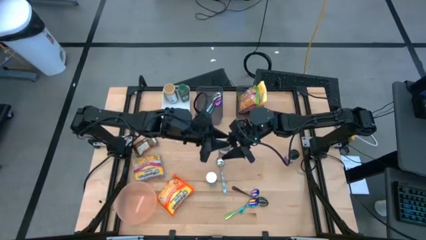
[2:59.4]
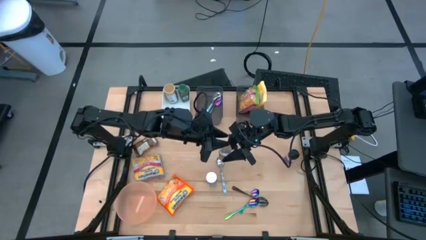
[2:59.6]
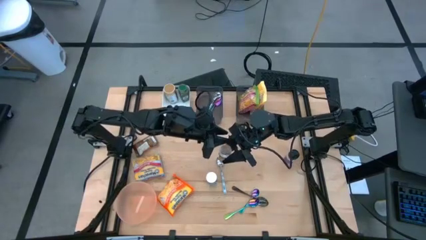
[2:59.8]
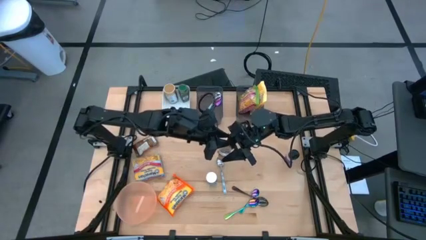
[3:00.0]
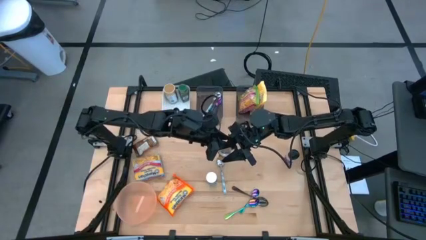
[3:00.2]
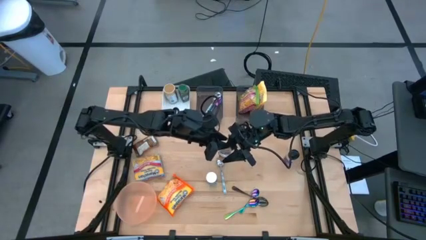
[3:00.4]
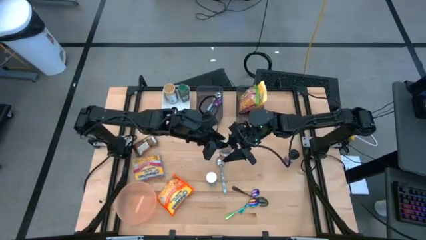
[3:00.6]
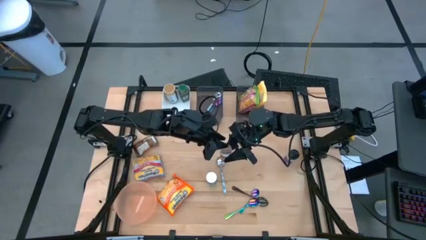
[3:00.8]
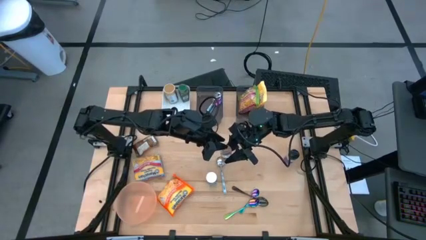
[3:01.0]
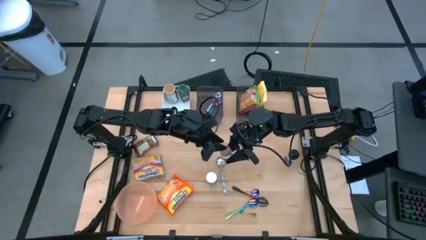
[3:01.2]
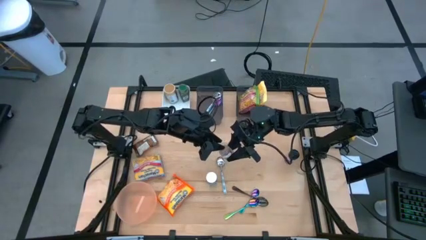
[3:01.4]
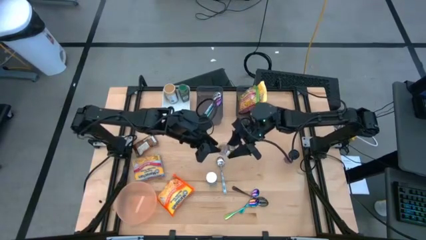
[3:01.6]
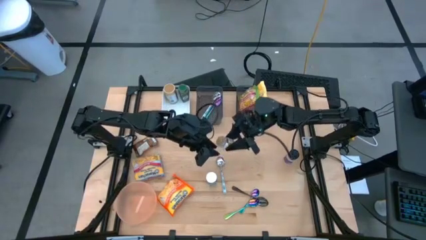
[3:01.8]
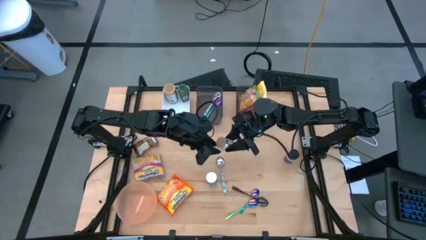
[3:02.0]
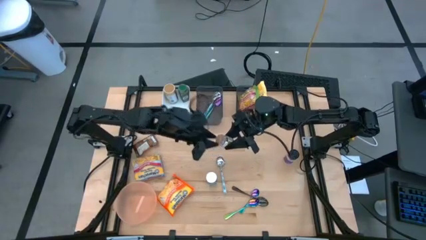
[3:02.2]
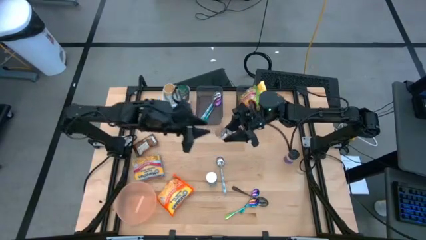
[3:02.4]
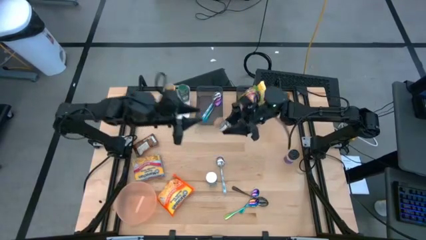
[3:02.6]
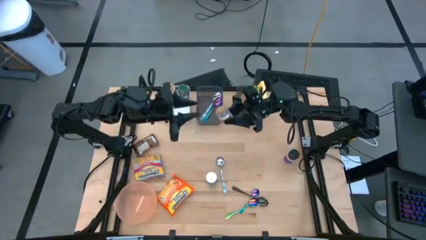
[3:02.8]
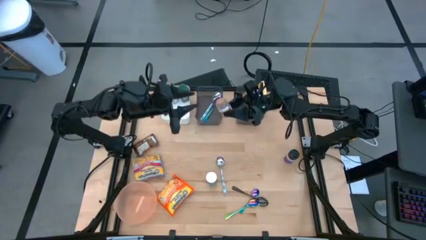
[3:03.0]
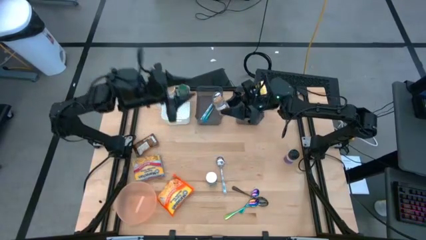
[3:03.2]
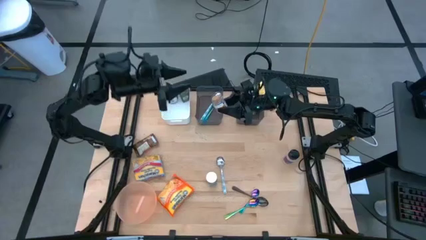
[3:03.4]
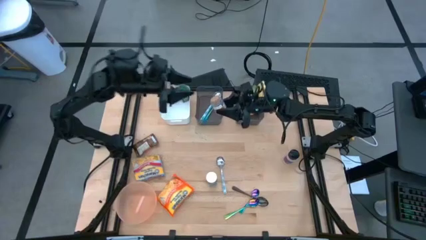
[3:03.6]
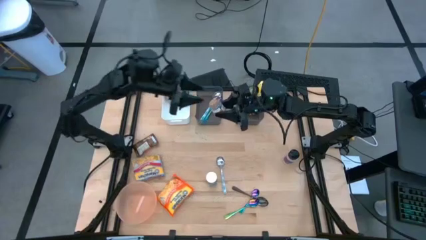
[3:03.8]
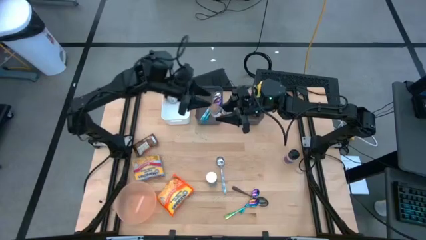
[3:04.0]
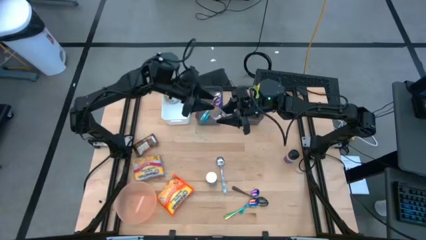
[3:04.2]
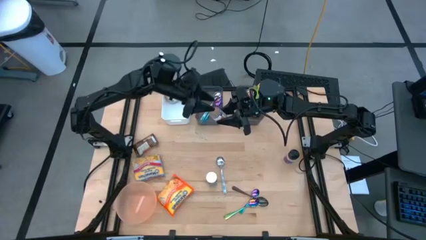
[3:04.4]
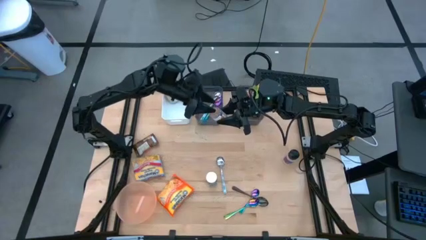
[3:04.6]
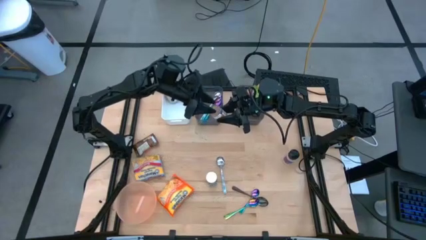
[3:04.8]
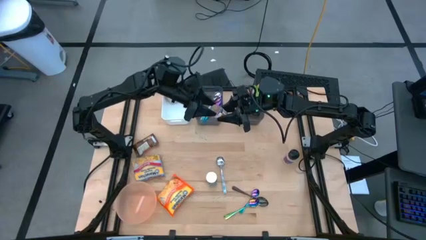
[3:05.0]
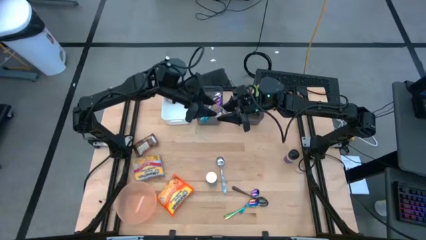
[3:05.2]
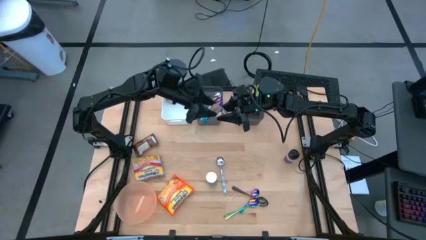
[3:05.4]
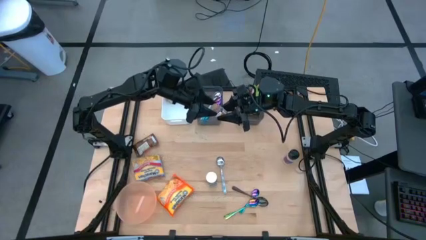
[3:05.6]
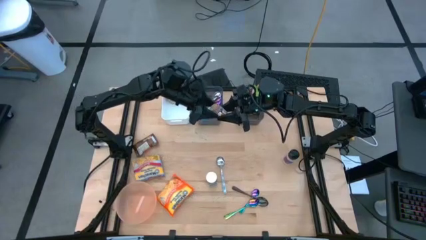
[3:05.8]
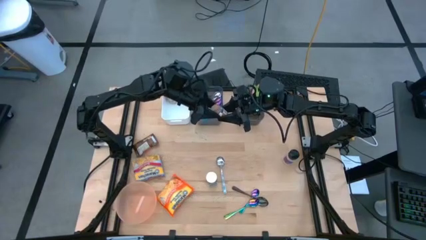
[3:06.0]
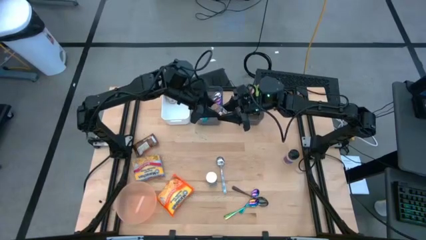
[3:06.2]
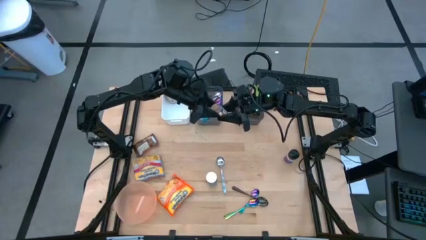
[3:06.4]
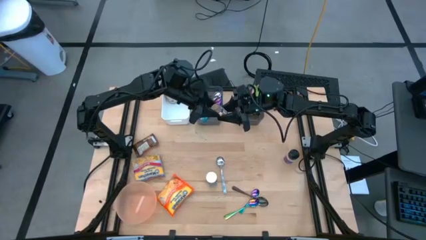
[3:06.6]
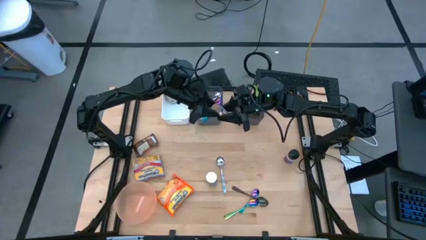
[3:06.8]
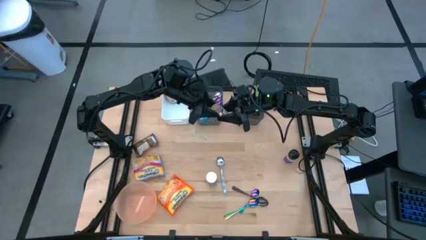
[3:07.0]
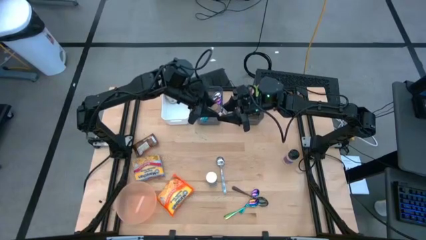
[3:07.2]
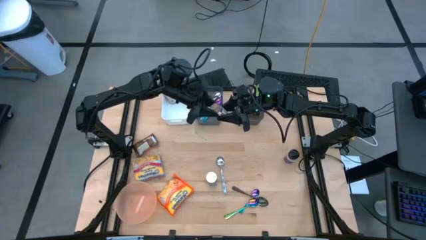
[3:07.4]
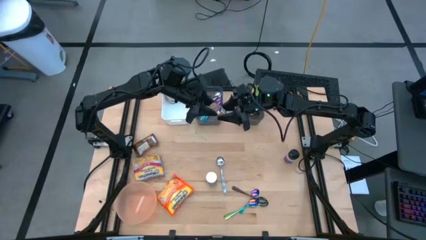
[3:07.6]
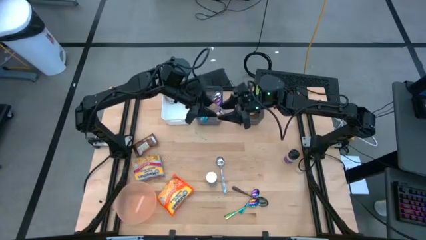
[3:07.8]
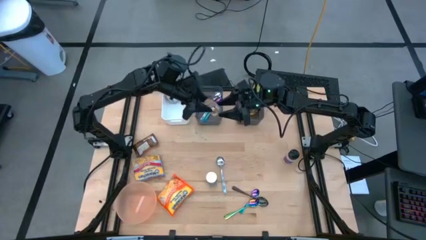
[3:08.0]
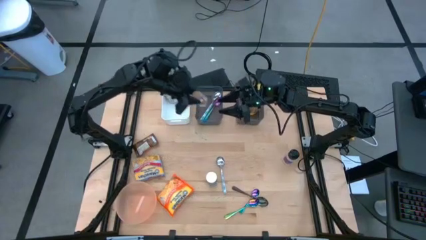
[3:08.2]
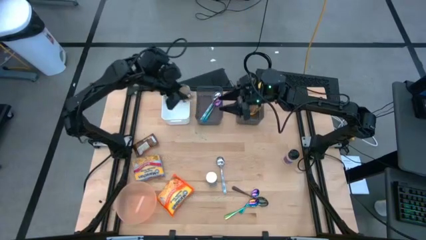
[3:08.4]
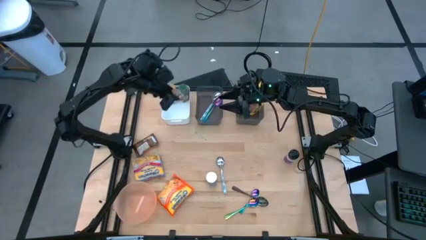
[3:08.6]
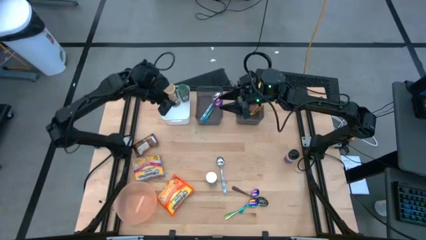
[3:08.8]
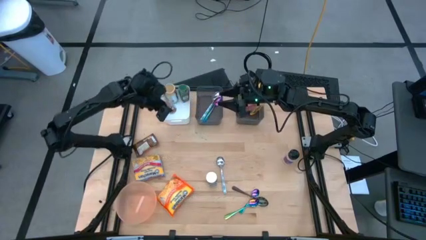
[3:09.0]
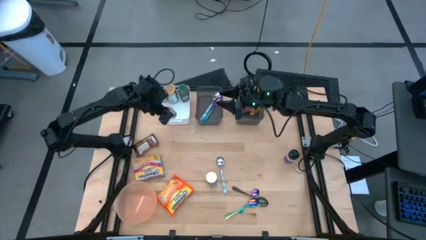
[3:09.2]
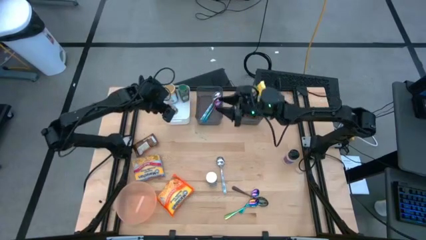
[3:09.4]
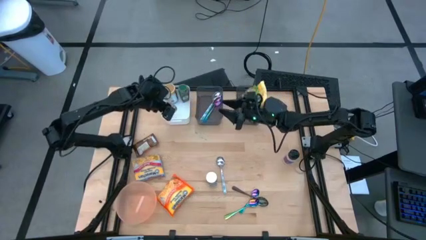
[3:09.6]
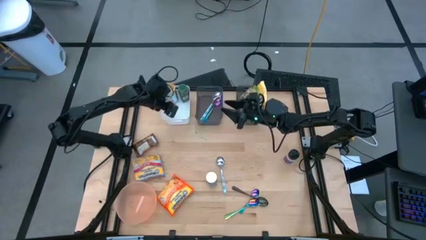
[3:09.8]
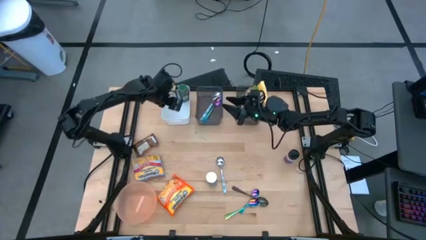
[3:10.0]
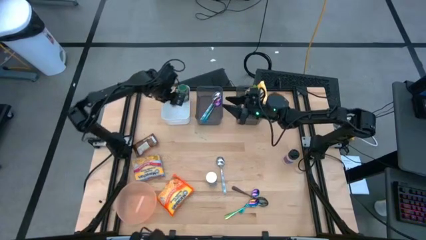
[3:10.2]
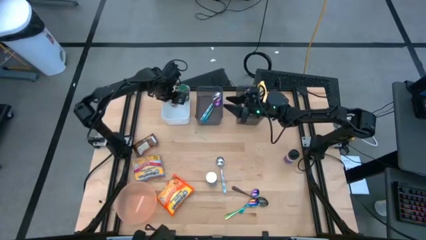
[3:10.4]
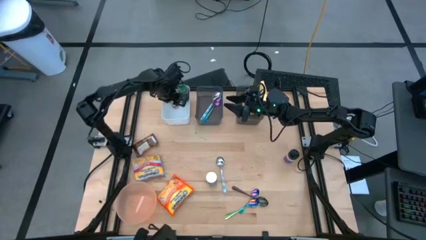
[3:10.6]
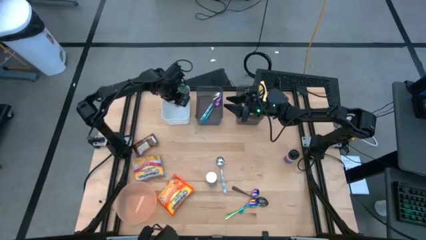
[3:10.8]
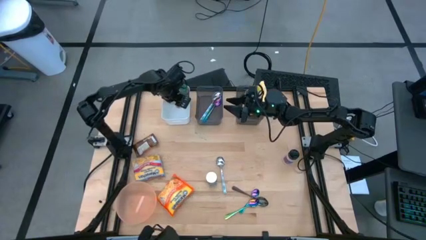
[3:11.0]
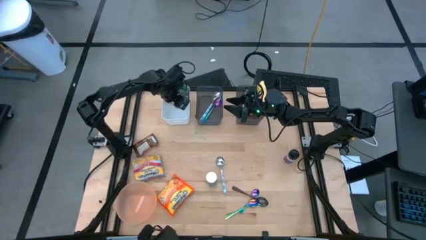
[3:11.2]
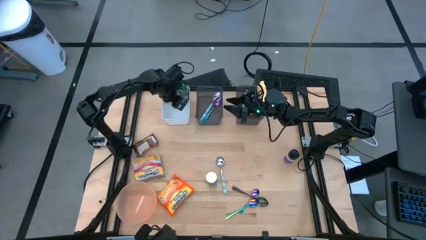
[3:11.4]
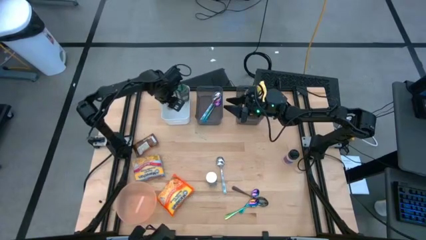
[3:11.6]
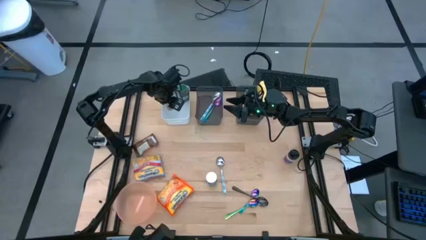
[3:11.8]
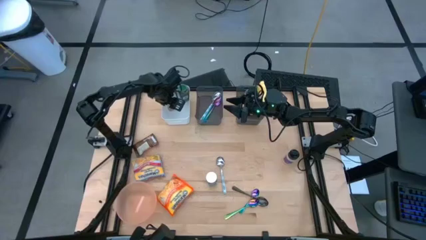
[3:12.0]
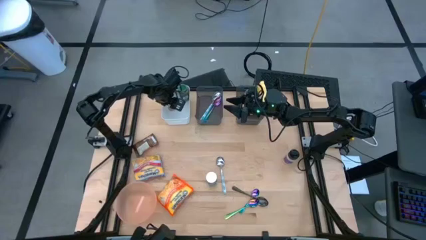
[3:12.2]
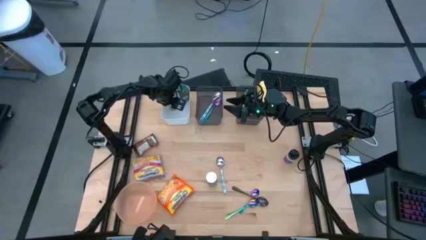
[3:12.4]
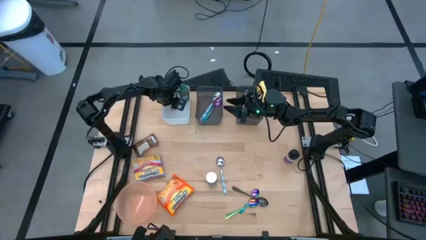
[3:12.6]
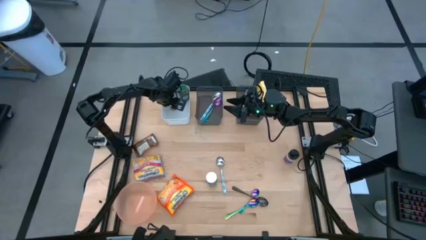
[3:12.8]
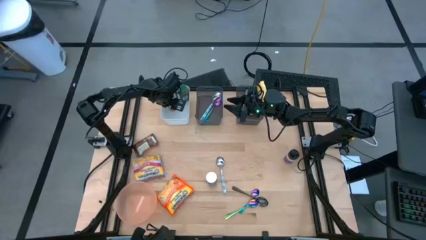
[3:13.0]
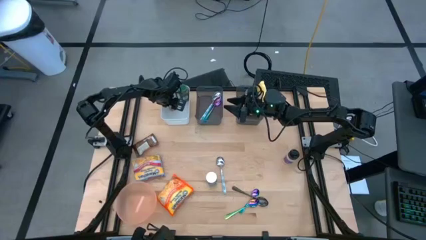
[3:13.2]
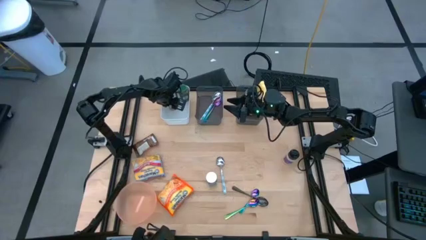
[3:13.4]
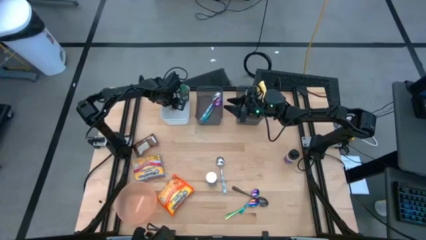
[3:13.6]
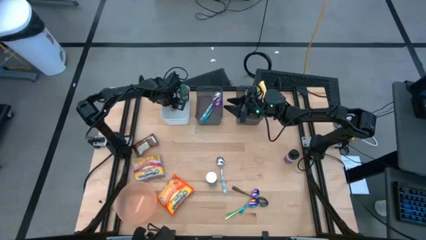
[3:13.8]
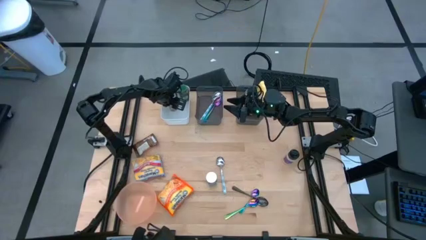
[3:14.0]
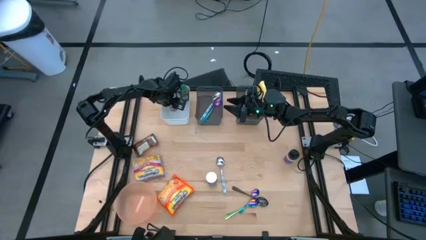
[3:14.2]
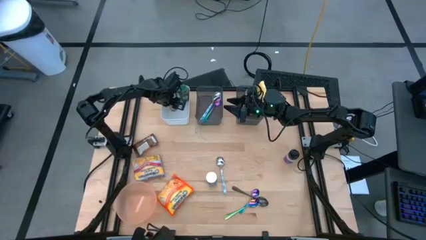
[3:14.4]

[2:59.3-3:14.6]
Task: Pick & Place Food Item
Put the brown seasoning bottle into the white bin
